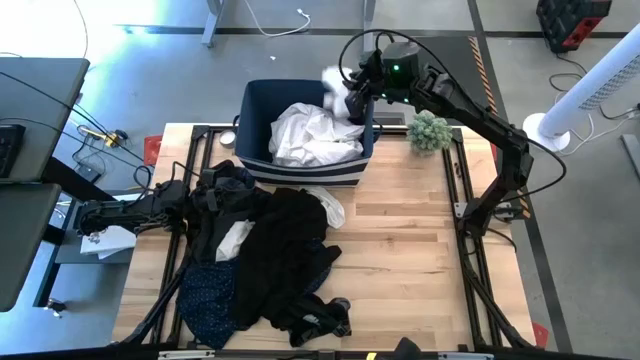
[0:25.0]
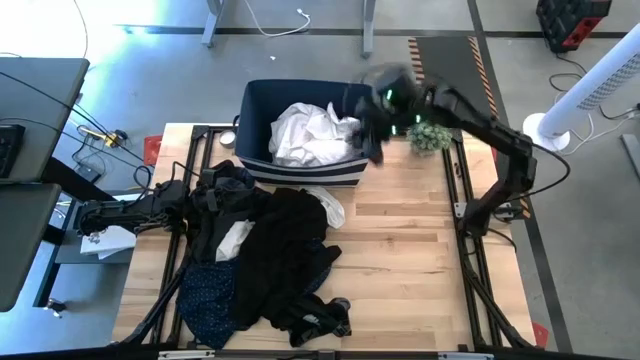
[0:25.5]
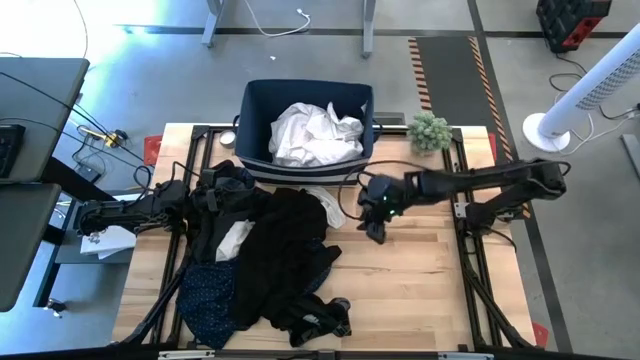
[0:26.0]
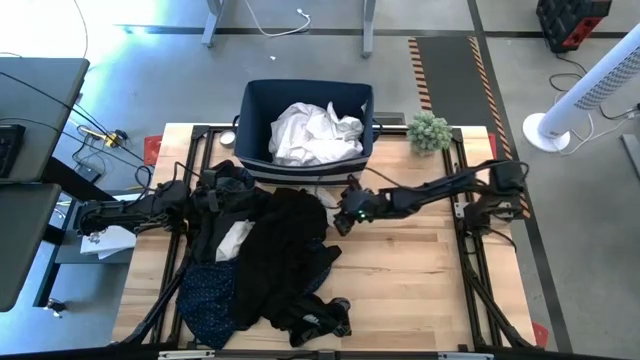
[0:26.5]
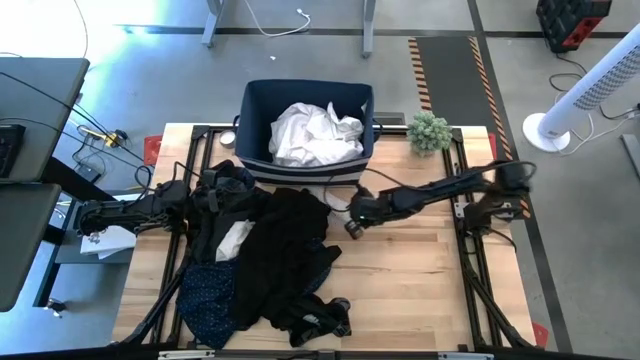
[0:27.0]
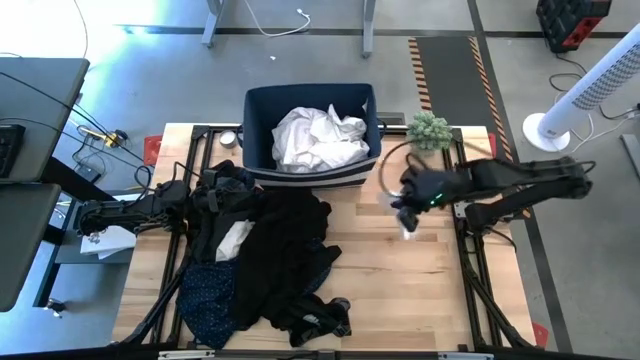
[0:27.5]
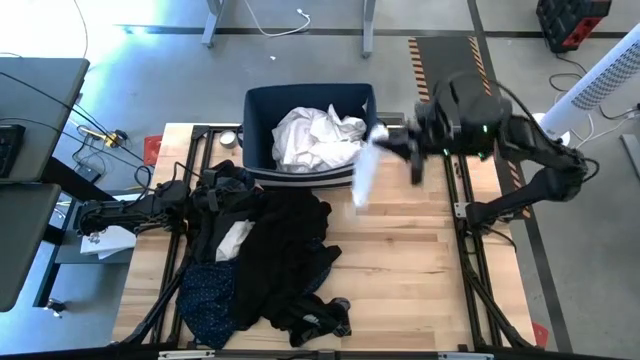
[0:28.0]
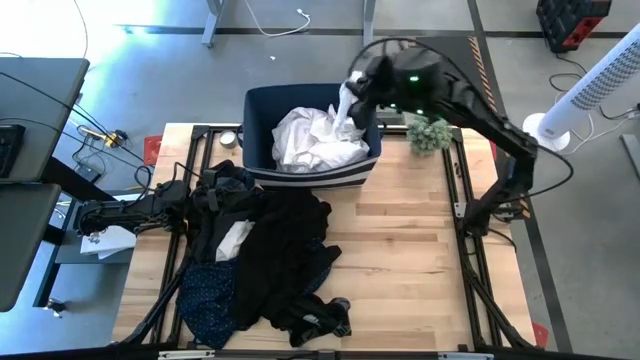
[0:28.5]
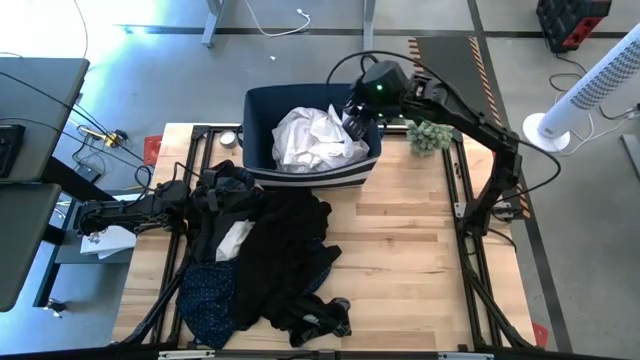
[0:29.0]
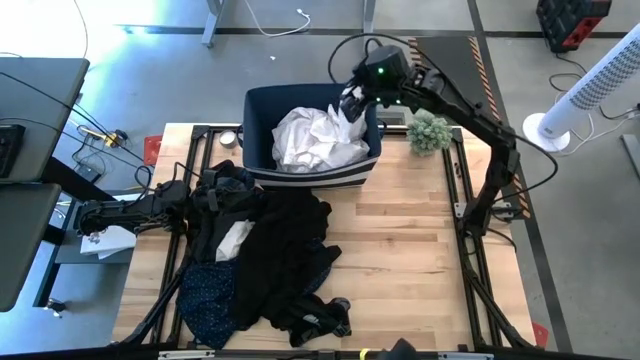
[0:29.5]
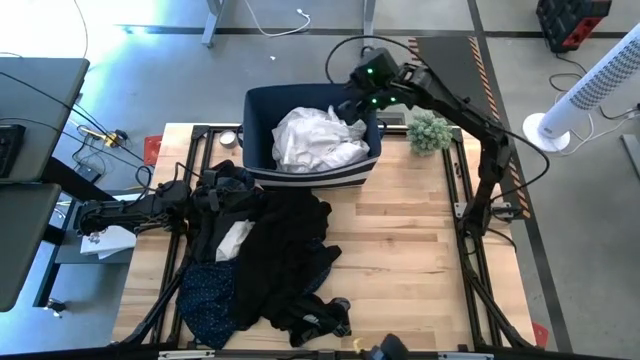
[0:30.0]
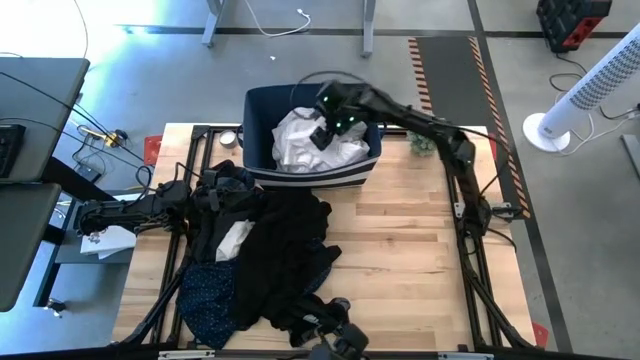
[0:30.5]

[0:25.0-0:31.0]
Task: Sort clothes
Put the top white sock into the laundry bin

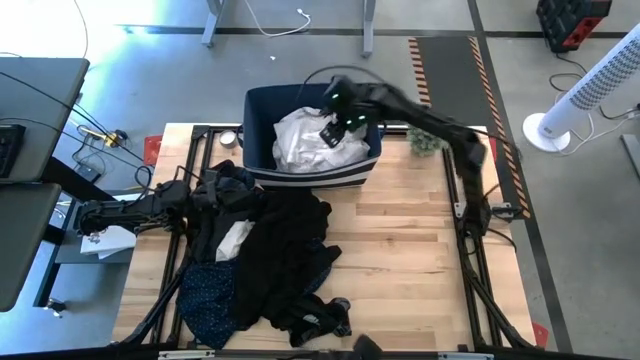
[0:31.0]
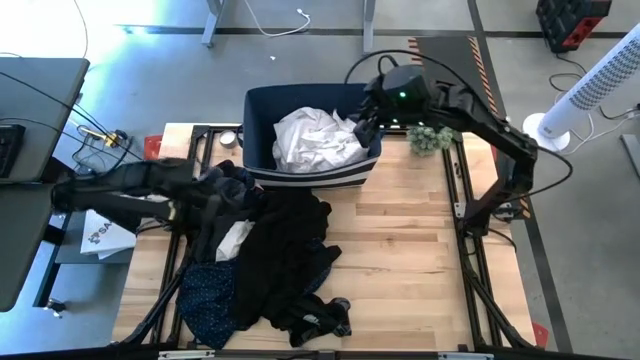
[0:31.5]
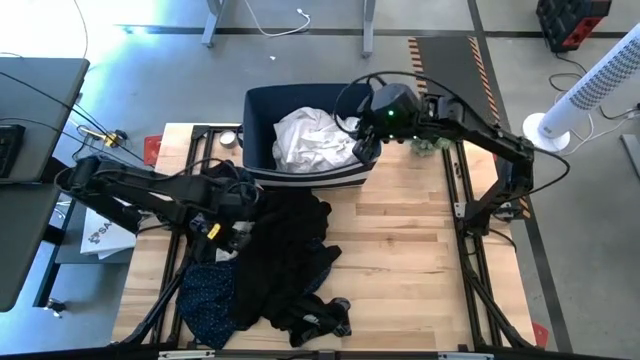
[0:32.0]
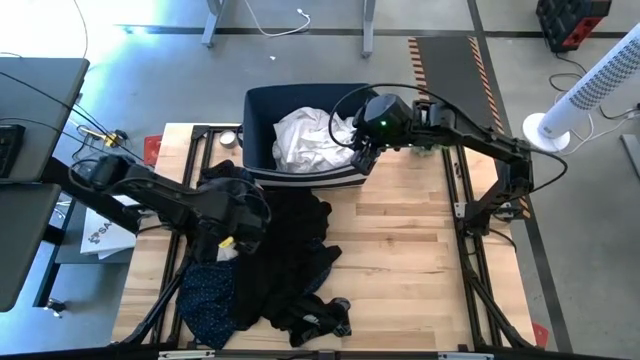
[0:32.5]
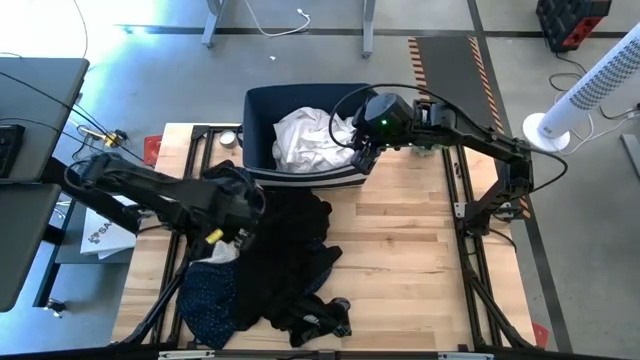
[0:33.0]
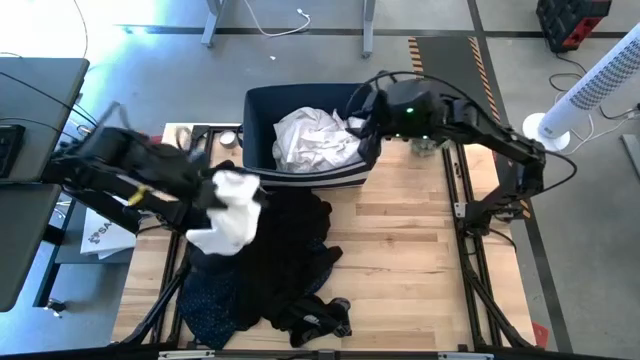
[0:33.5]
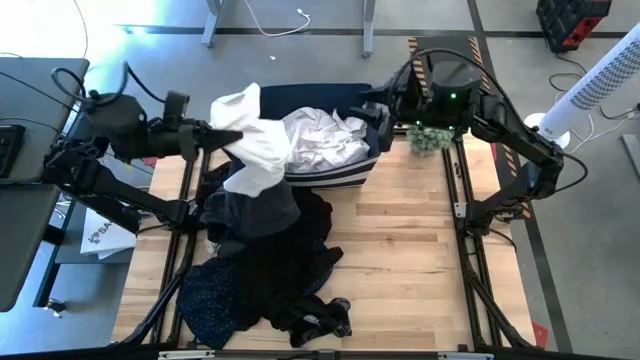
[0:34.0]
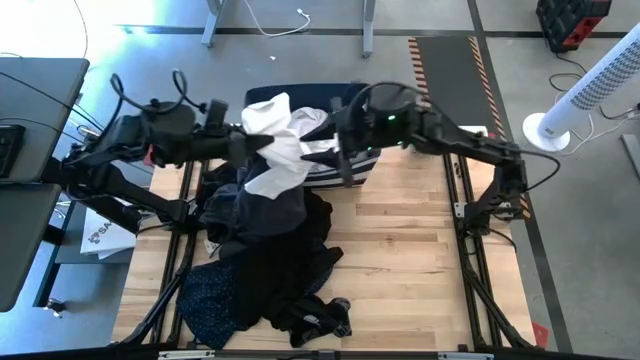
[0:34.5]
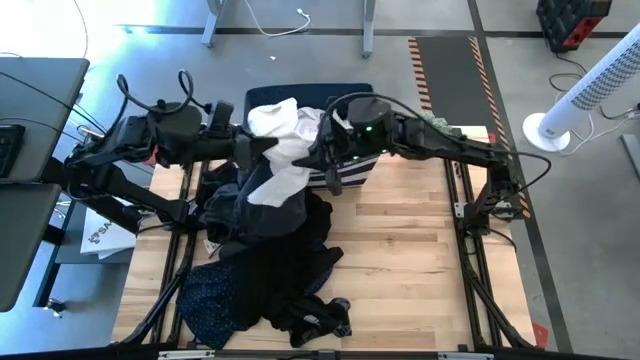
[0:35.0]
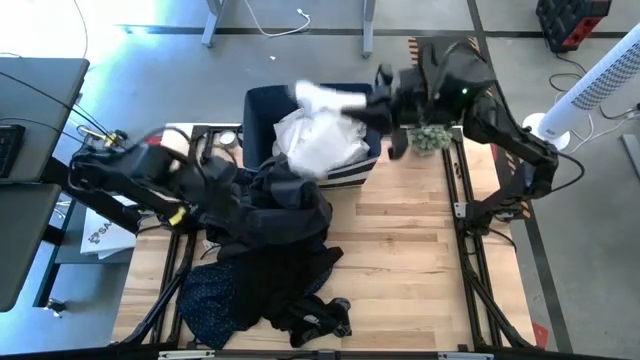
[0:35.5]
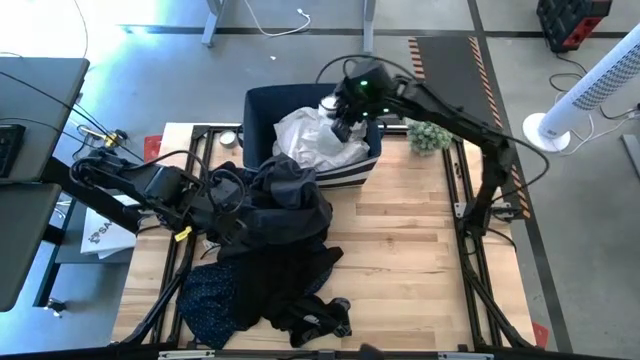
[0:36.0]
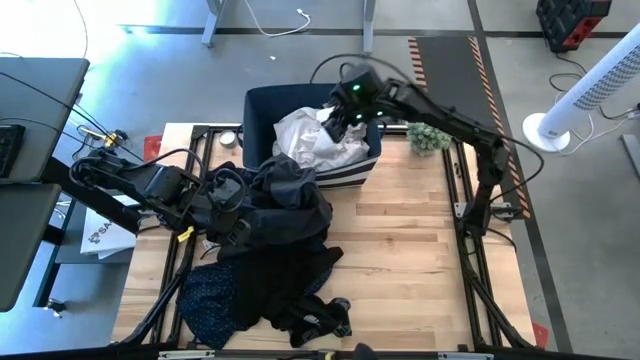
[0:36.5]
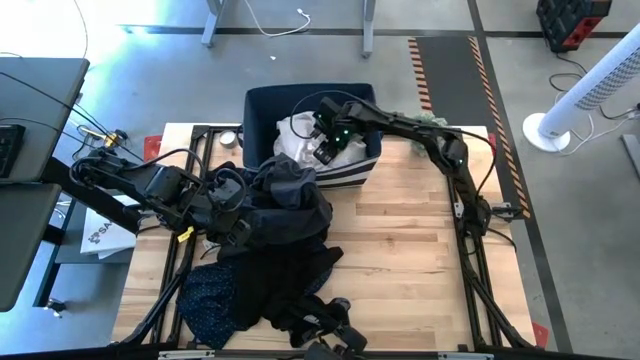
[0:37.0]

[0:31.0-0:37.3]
Put the white boxer into the laundry bin

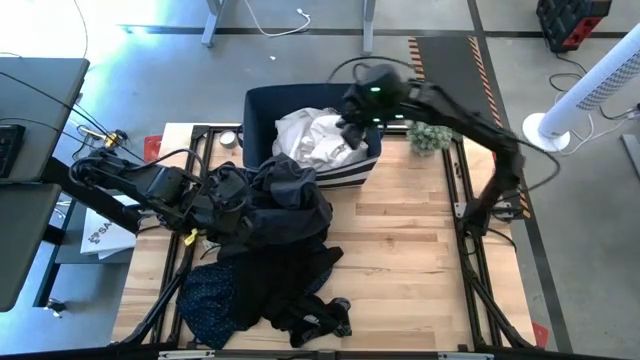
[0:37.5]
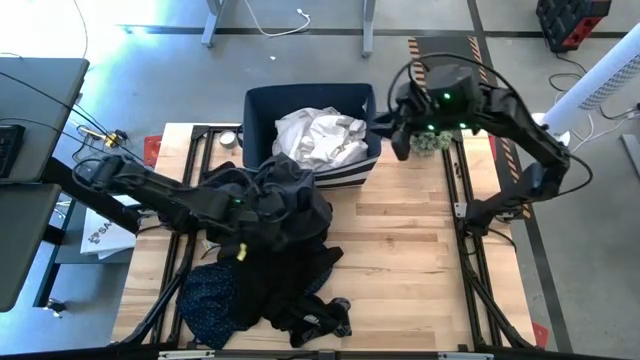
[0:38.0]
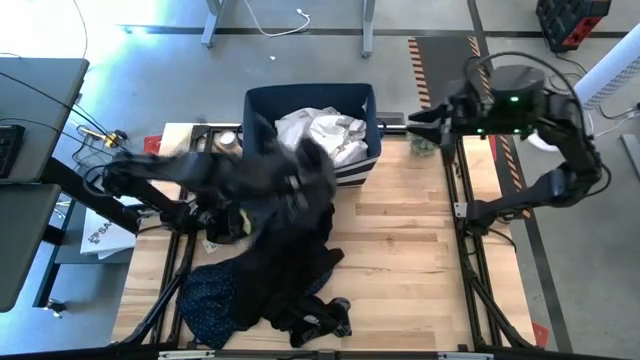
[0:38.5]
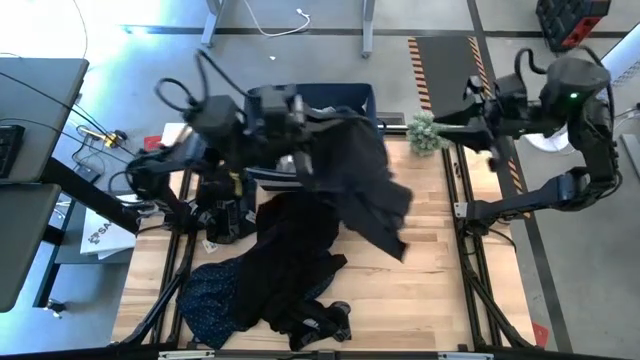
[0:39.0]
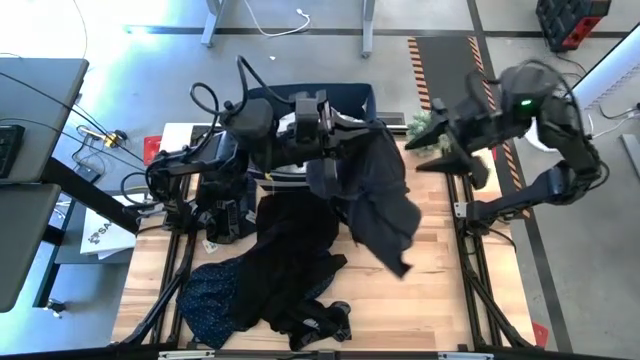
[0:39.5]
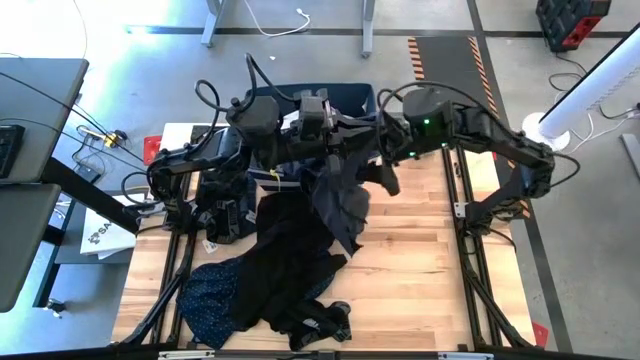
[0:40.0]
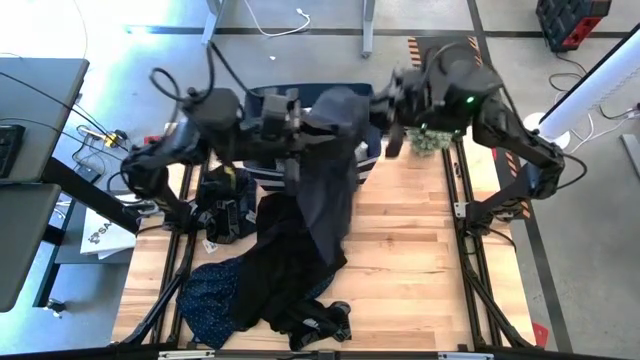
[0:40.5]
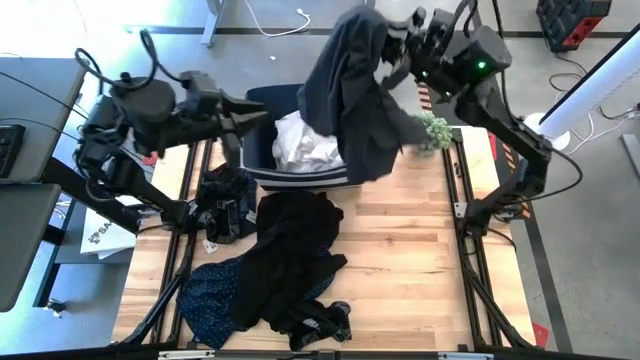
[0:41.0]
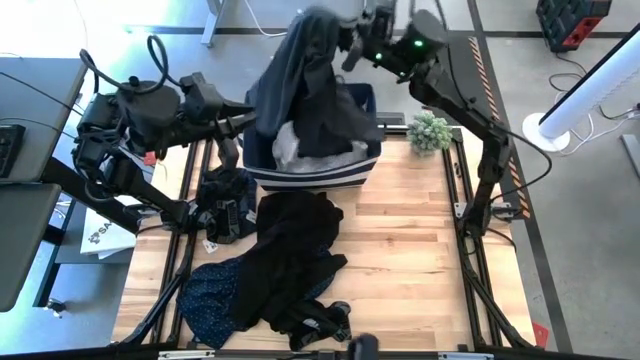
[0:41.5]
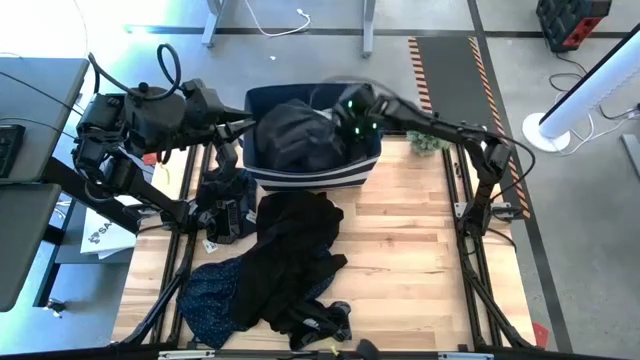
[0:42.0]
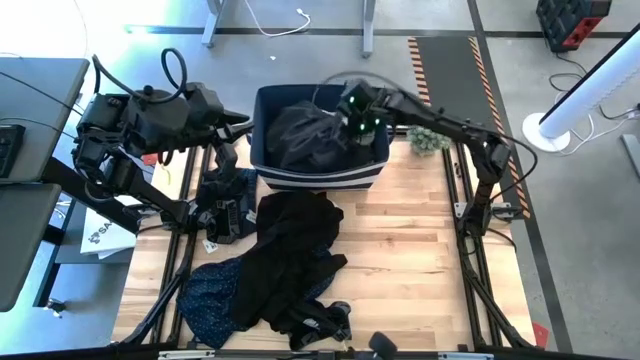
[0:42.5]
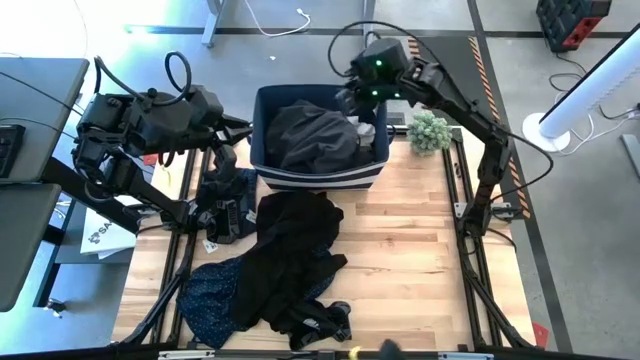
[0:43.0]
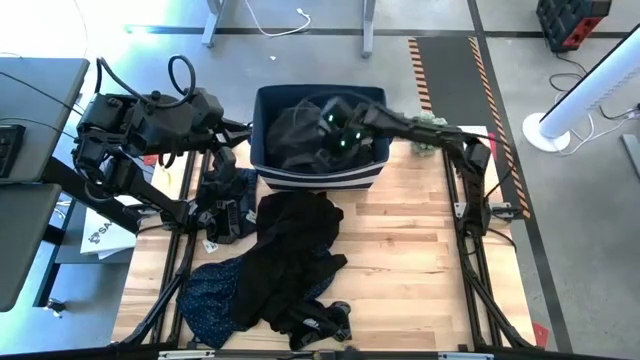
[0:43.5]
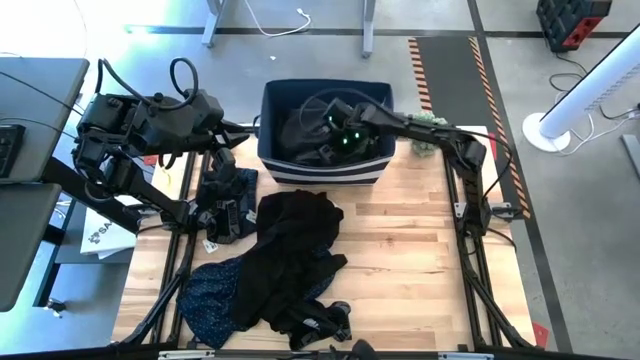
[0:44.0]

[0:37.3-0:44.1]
Put the black shorts into the laundry bin

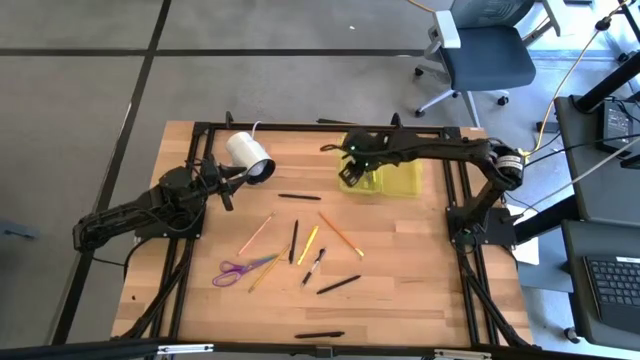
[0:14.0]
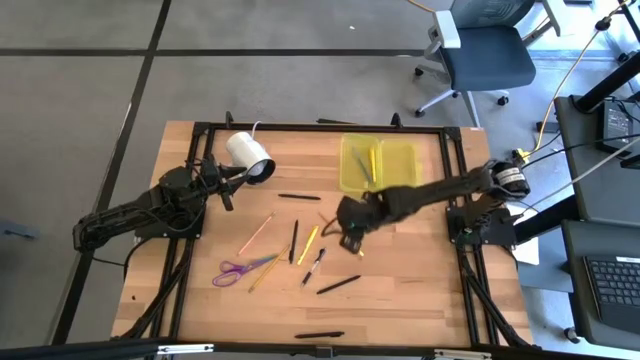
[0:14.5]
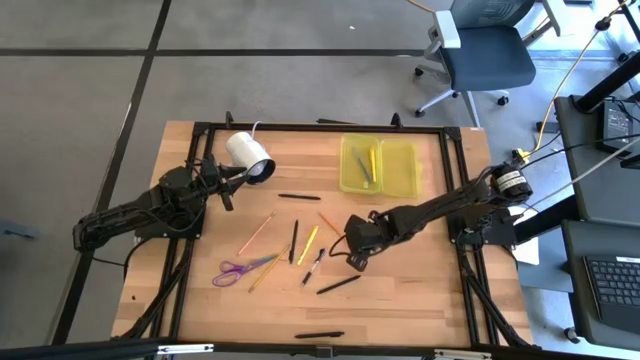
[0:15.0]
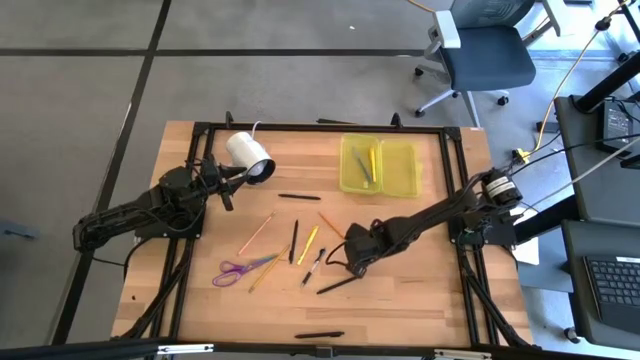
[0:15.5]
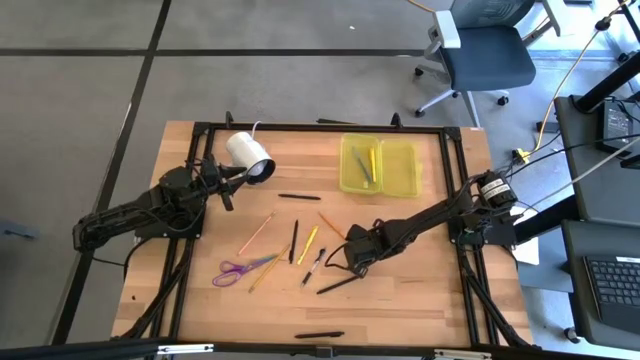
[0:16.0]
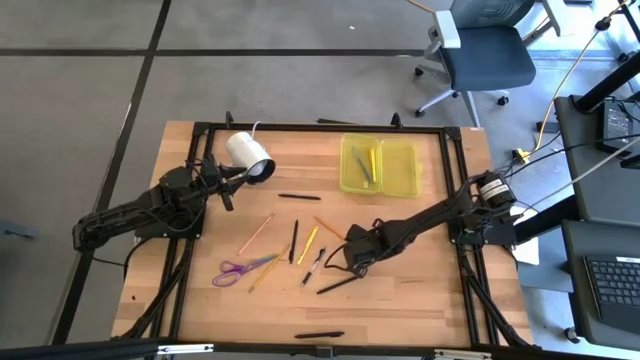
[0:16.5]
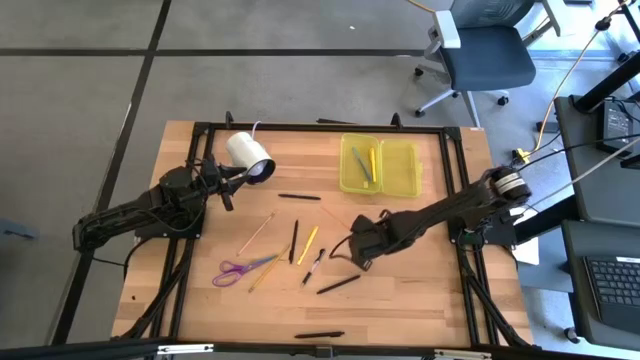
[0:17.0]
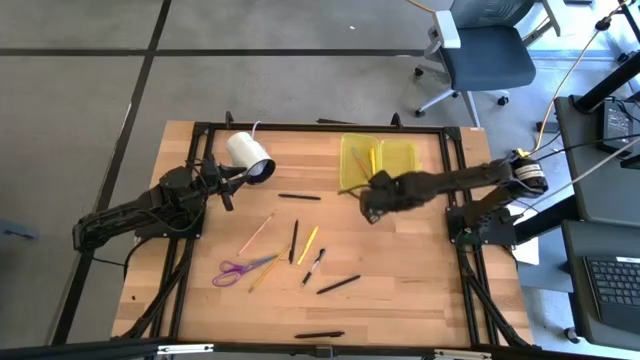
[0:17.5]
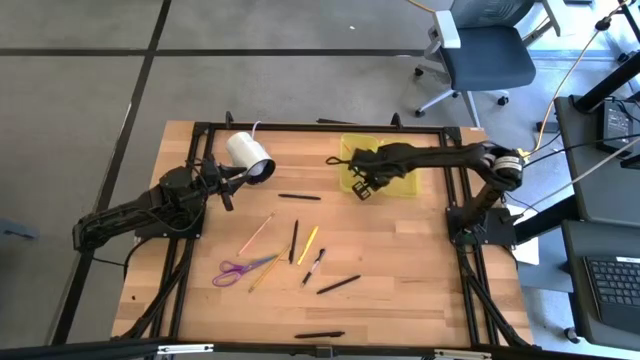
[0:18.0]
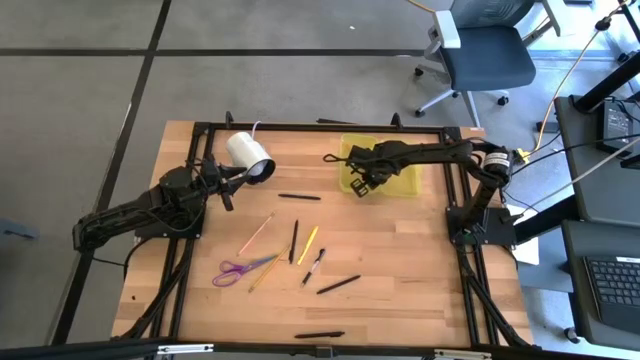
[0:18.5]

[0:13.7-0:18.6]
Task: Pick & place school supplies into a supply box
Put the orange pencil into the yellow supply box
